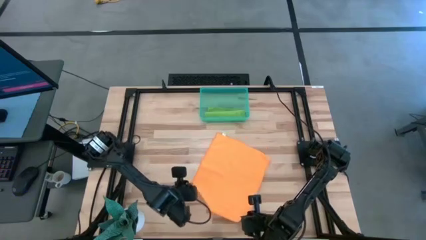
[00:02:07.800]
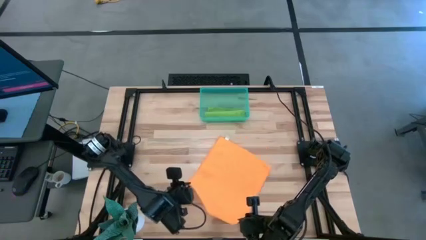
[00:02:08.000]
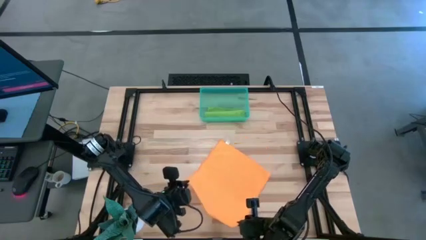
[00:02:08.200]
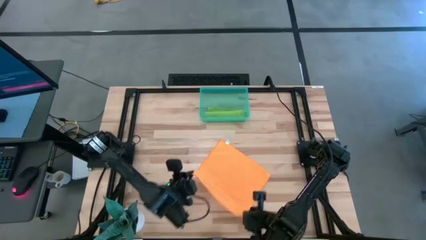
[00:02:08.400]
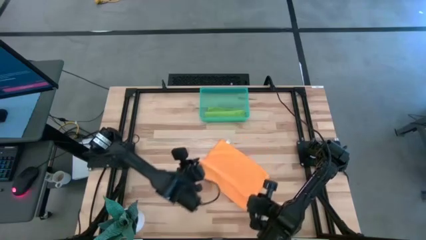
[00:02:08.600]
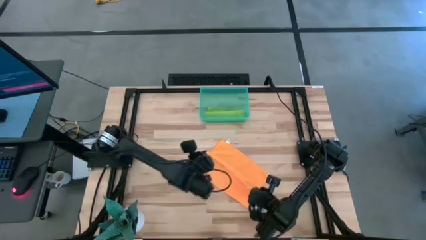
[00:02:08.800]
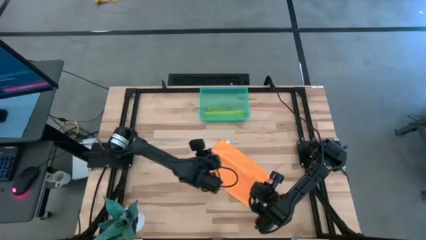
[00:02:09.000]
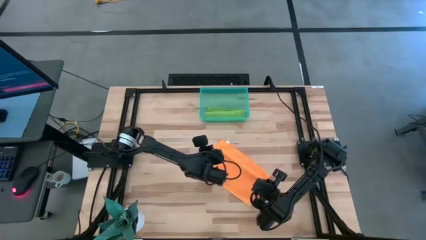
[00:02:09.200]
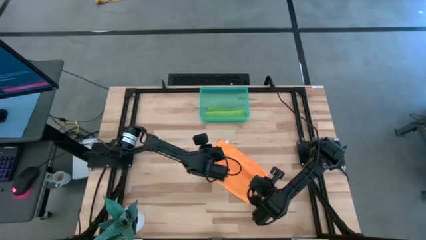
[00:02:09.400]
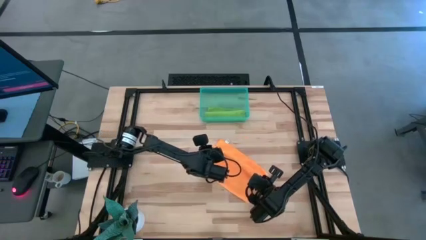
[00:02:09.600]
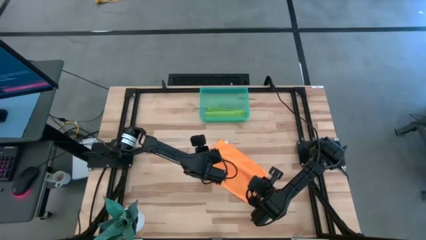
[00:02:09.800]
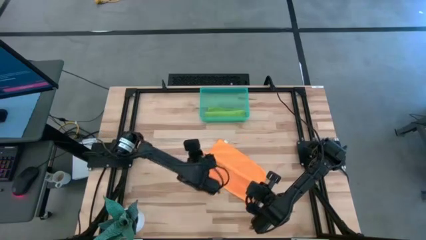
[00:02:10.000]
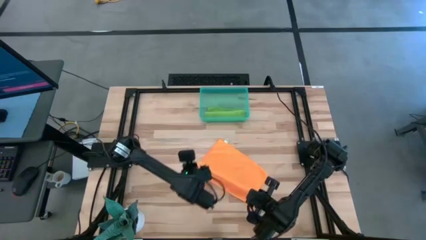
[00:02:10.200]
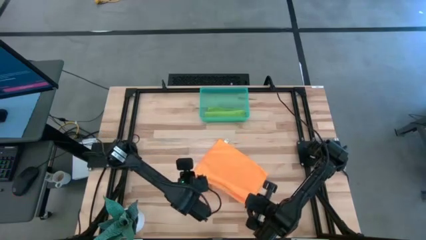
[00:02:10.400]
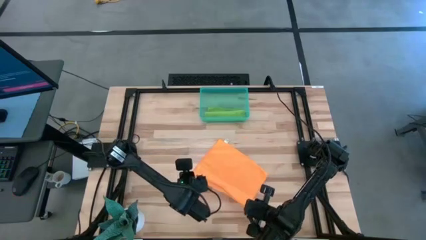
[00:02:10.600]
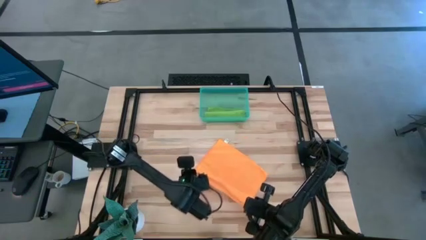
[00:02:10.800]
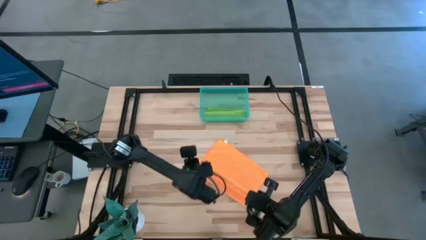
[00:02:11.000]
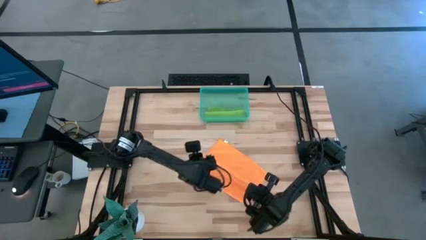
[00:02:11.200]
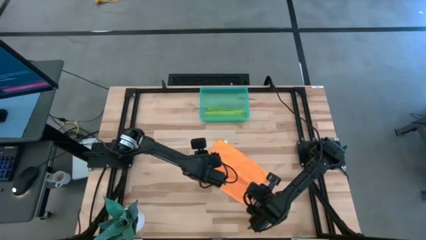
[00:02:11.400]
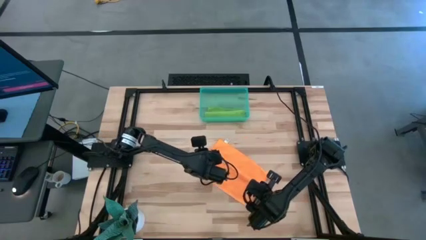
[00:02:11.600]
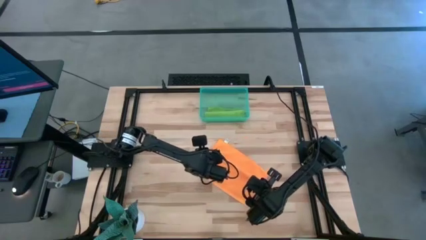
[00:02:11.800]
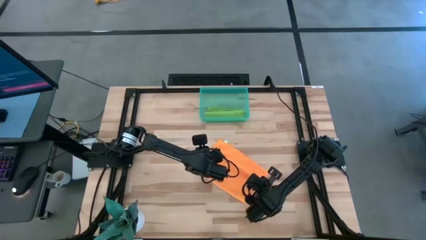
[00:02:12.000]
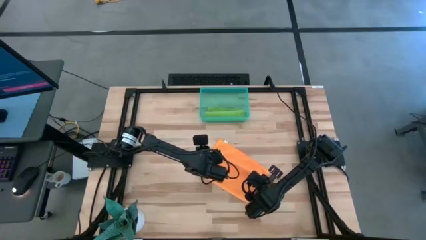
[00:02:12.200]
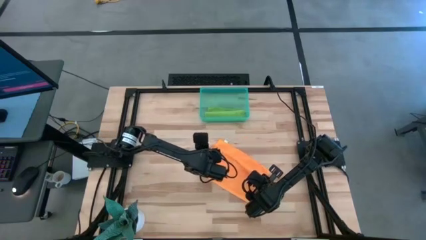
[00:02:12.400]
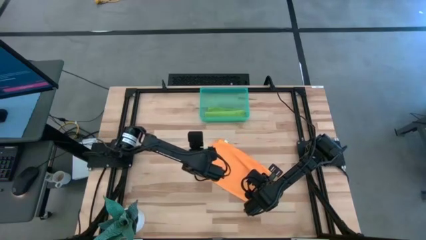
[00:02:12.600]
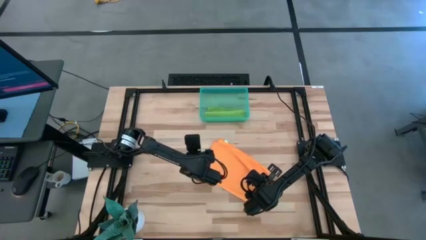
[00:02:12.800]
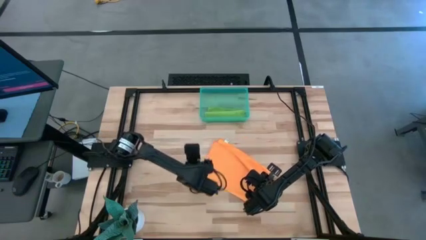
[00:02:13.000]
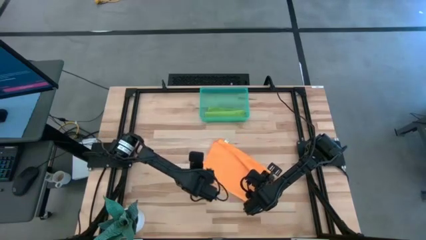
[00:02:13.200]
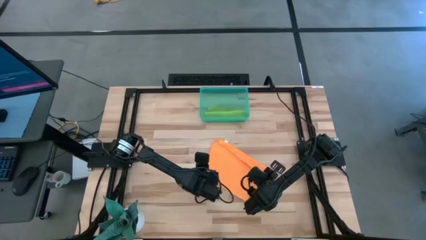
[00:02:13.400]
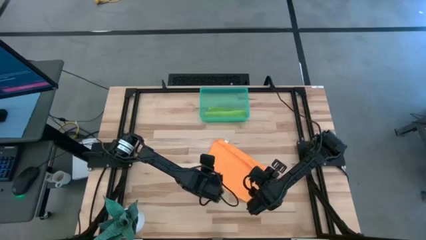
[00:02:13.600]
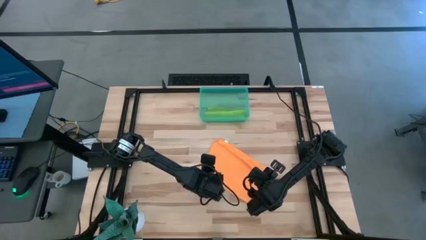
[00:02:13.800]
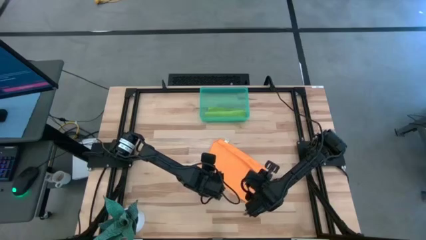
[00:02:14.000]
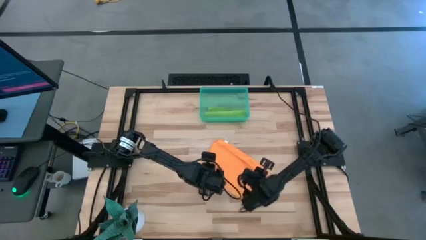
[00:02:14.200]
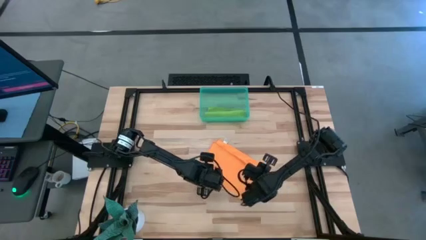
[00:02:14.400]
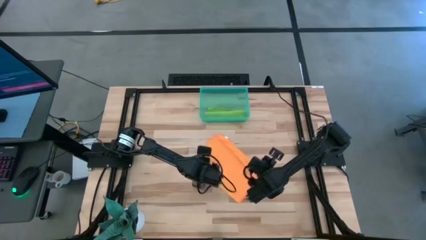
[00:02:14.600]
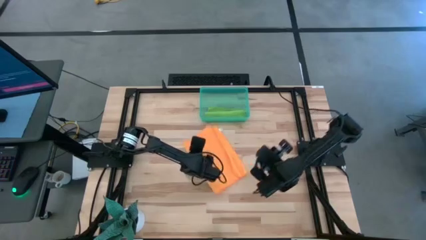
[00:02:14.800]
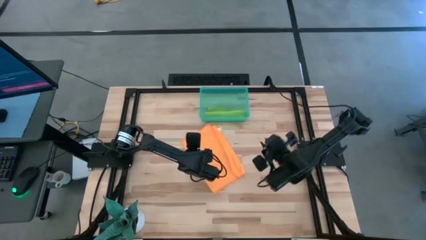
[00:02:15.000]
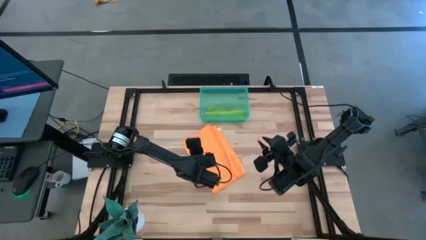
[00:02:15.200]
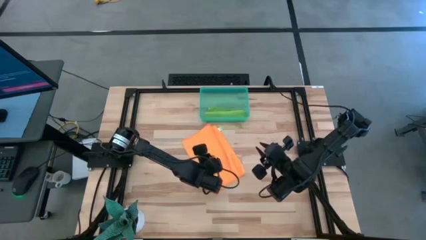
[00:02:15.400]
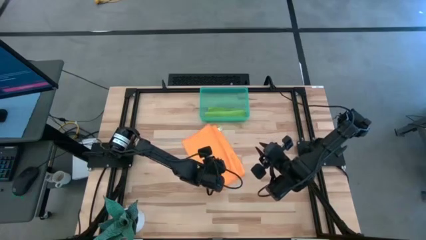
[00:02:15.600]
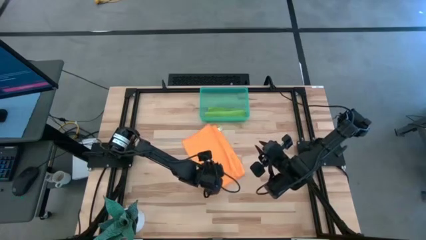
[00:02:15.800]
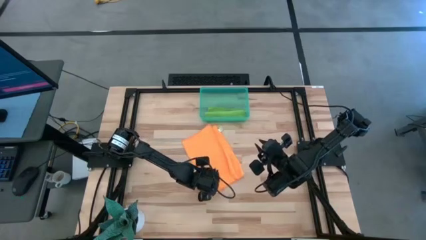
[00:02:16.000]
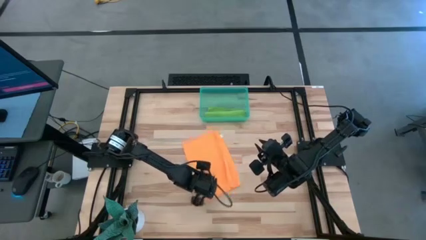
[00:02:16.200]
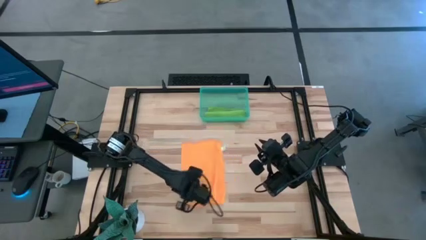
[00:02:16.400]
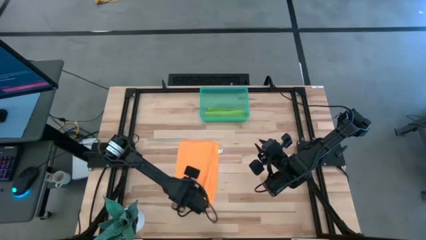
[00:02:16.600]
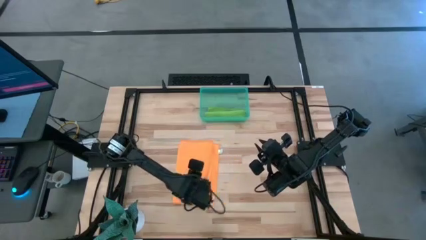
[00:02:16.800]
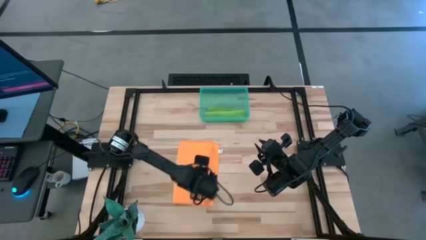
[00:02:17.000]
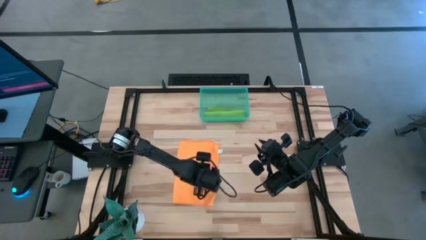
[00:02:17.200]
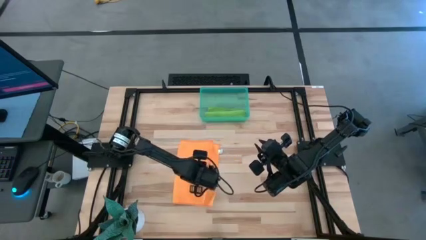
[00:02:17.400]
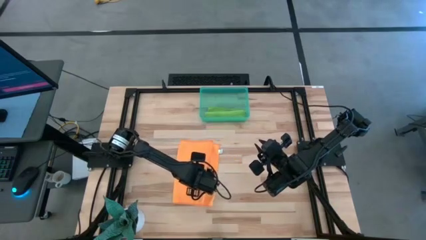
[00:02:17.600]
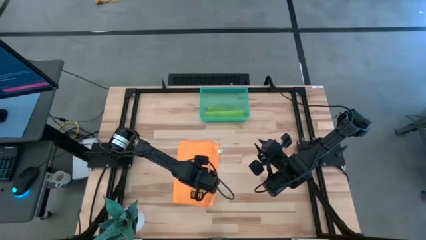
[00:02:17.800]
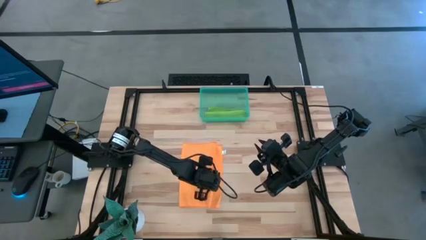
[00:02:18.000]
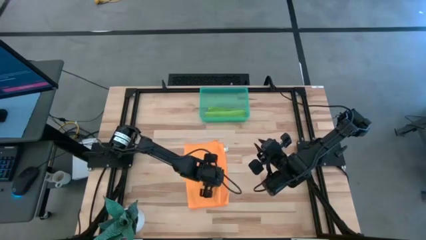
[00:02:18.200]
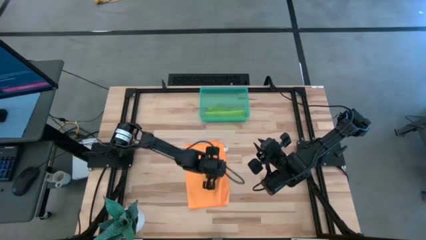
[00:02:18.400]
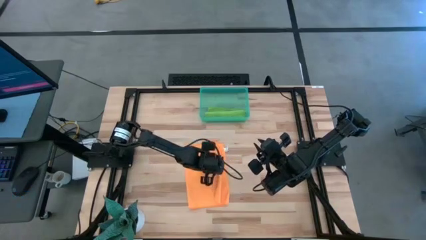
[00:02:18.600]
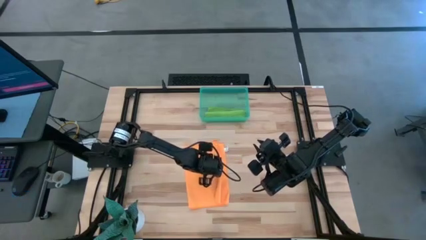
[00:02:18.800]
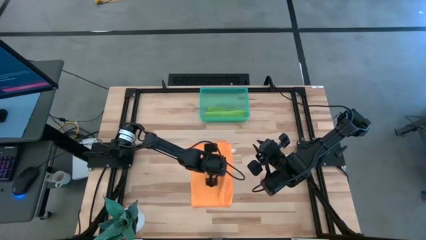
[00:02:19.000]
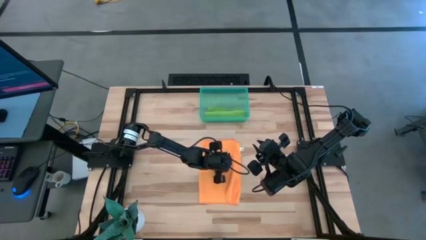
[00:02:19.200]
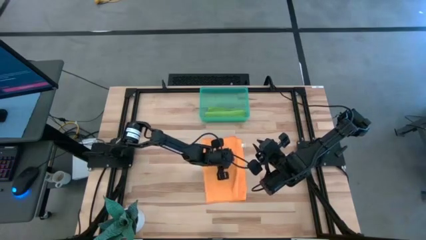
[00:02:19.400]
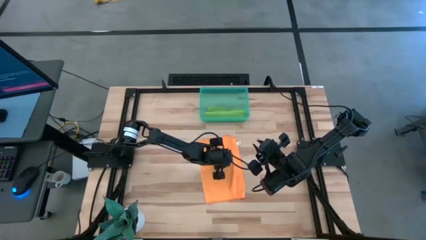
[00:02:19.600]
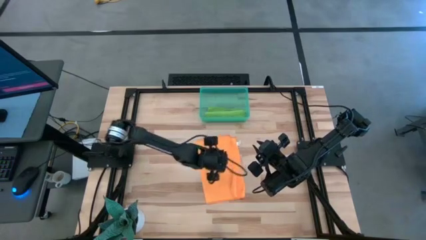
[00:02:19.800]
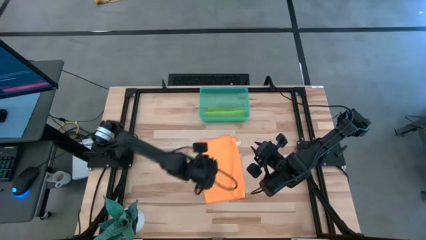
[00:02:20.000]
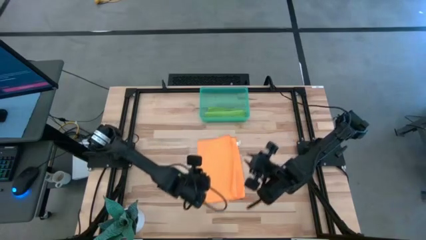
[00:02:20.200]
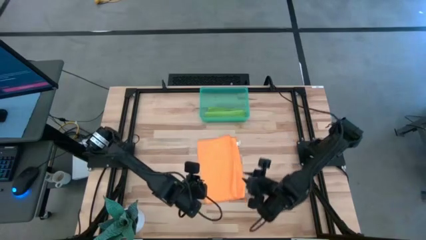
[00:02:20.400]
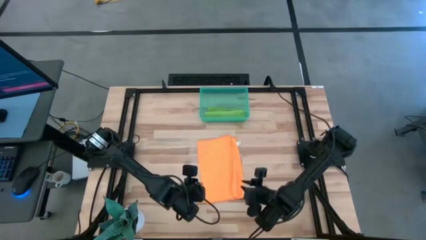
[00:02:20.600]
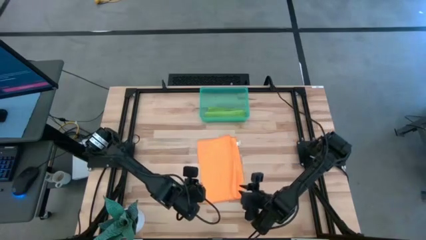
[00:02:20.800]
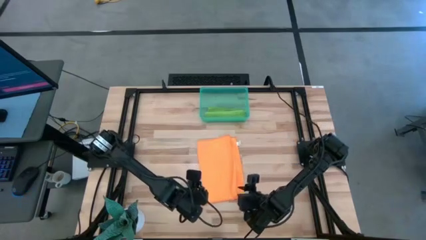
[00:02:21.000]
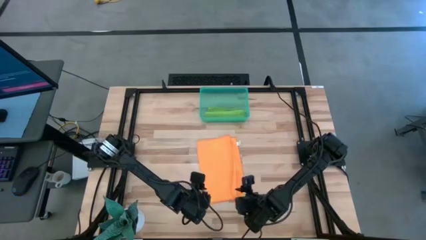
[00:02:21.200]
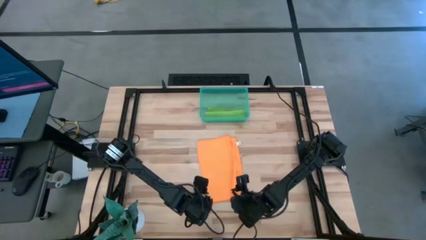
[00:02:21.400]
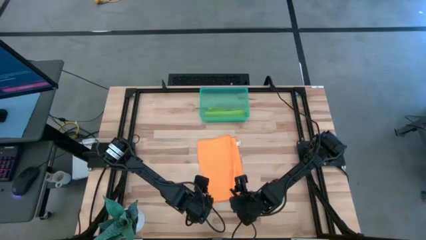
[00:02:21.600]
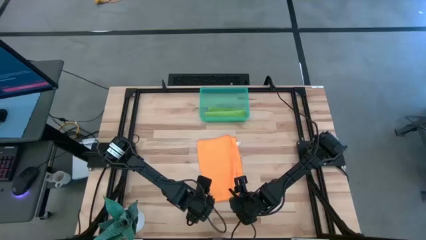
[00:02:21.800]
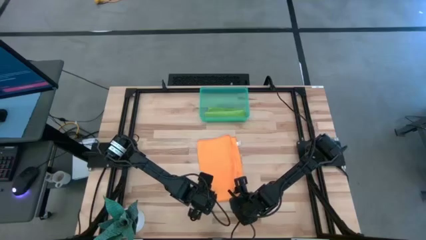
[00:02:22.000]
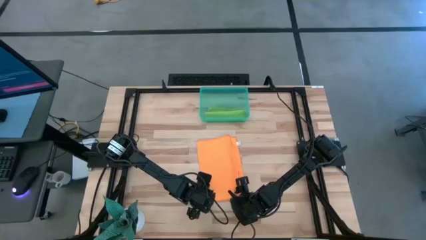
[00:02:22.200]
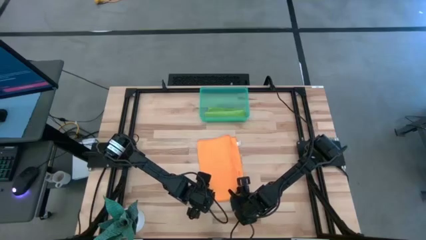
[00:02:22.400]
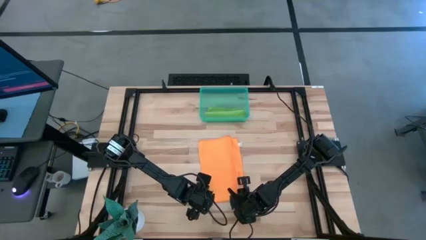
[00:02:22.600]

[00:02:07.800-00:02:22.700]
Task: Roll microfiber towels into tight, uniform cylinder then place into a basket
Fold the yellow microfiber towel
